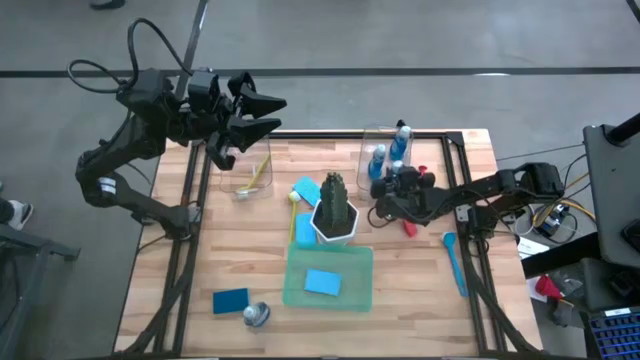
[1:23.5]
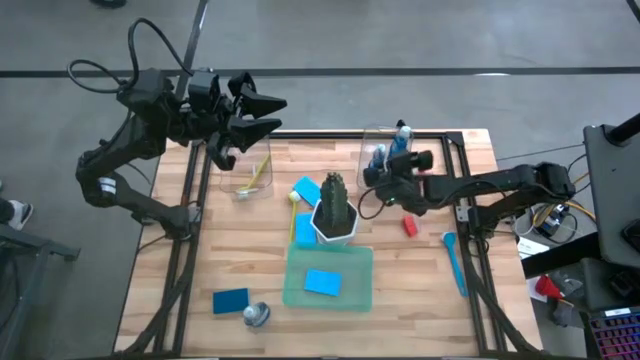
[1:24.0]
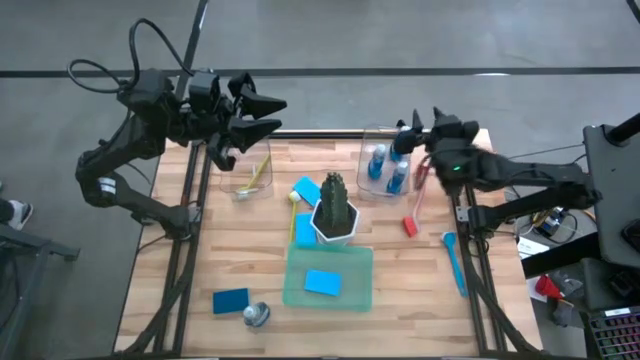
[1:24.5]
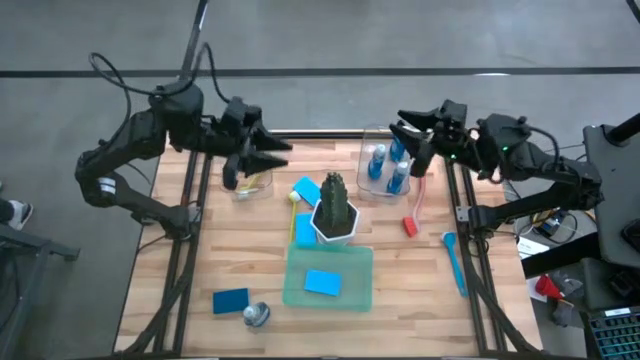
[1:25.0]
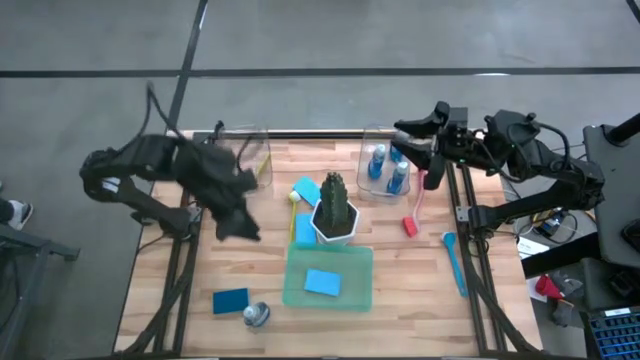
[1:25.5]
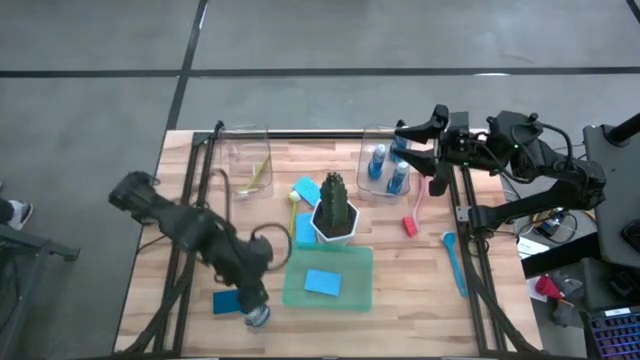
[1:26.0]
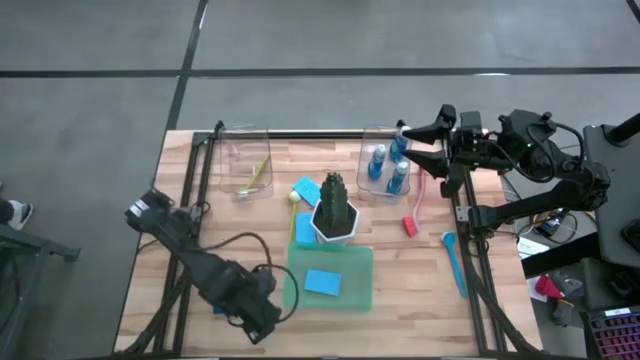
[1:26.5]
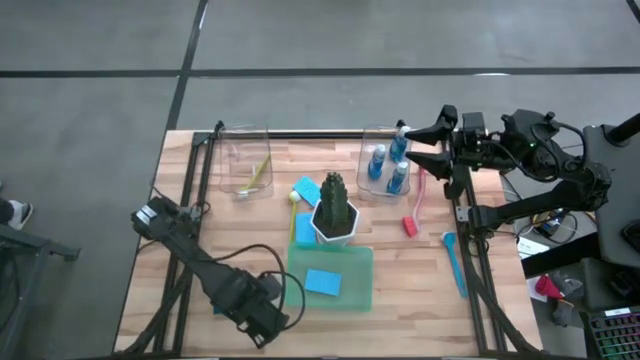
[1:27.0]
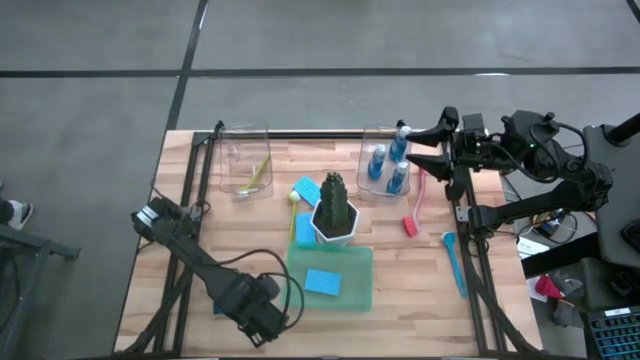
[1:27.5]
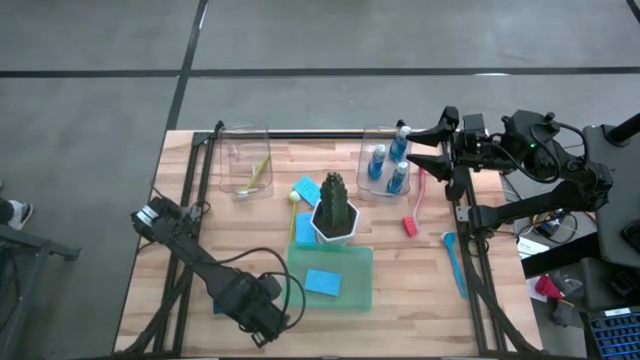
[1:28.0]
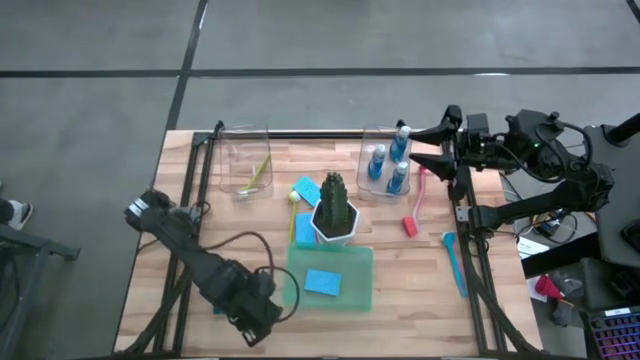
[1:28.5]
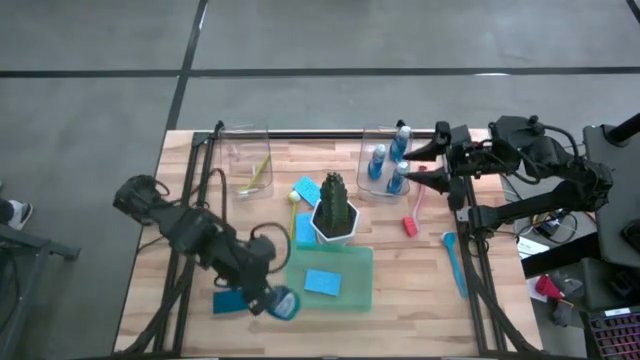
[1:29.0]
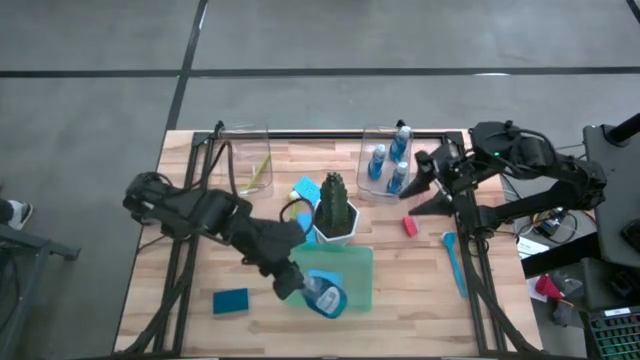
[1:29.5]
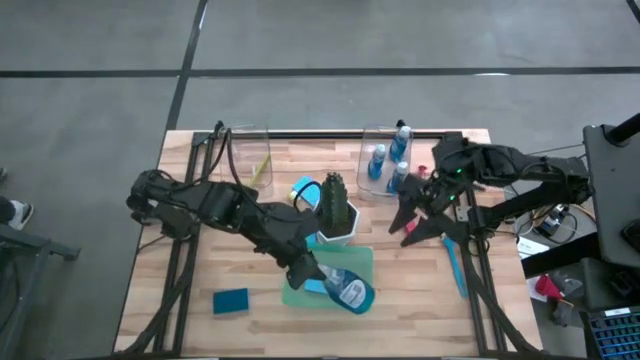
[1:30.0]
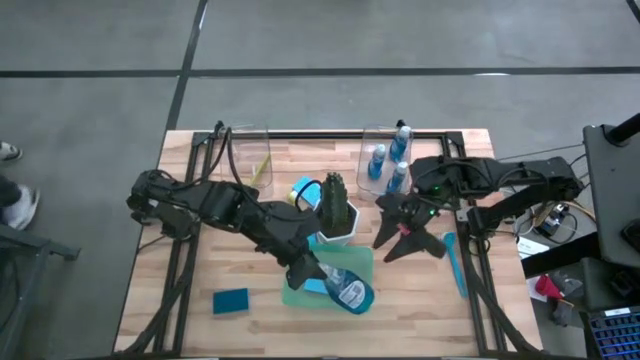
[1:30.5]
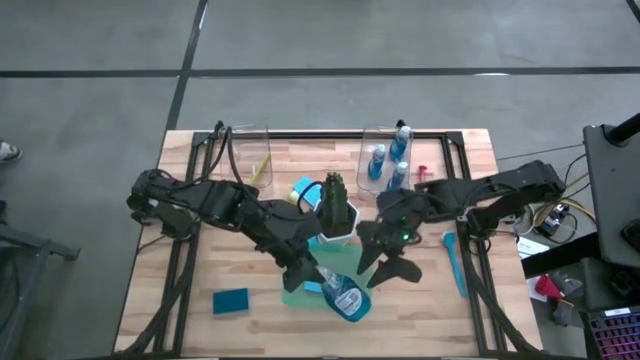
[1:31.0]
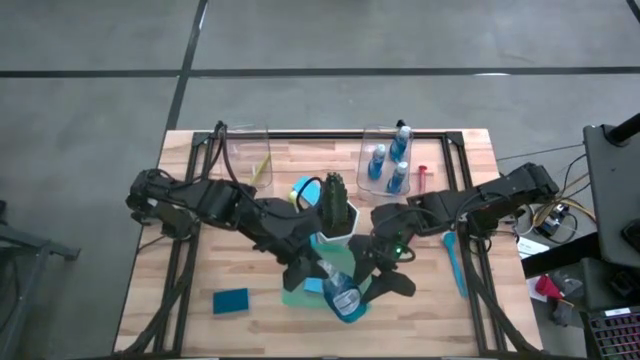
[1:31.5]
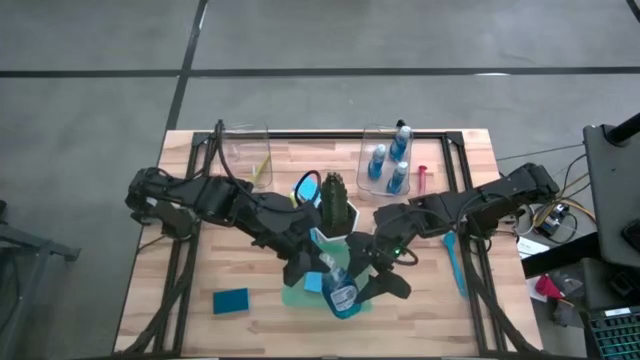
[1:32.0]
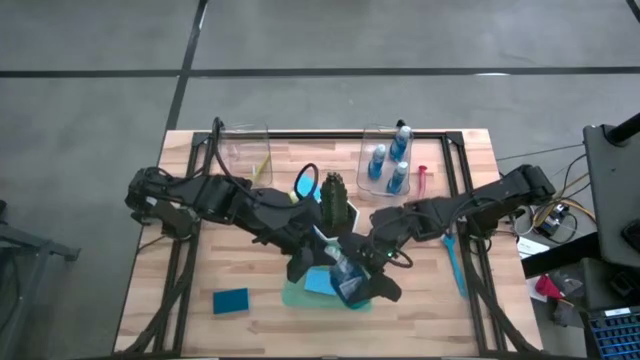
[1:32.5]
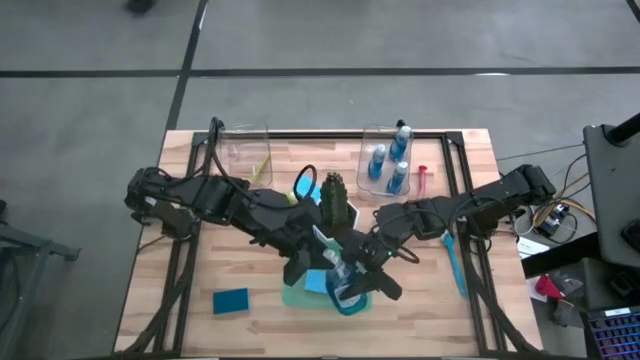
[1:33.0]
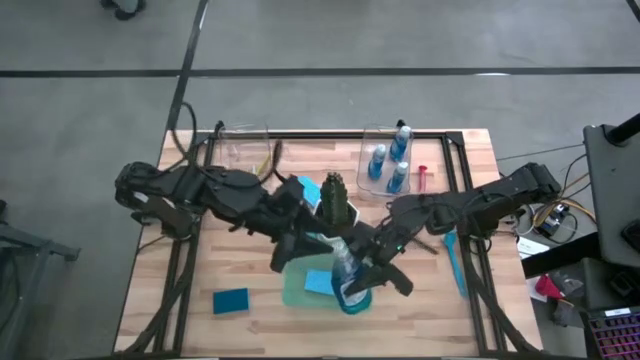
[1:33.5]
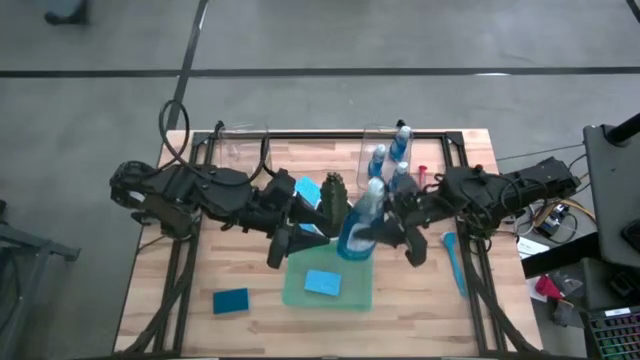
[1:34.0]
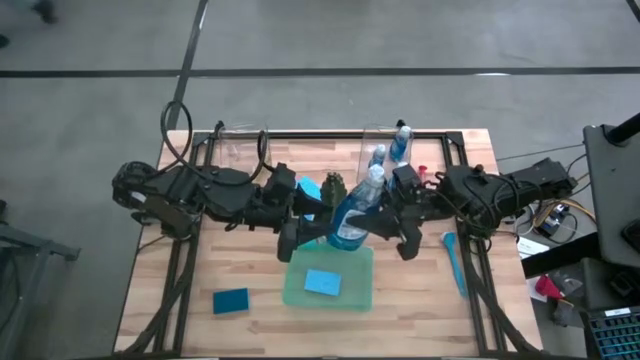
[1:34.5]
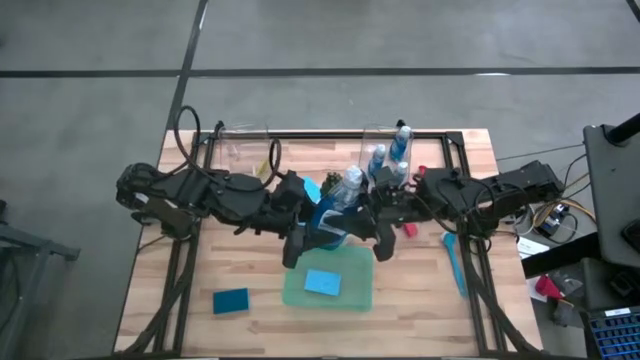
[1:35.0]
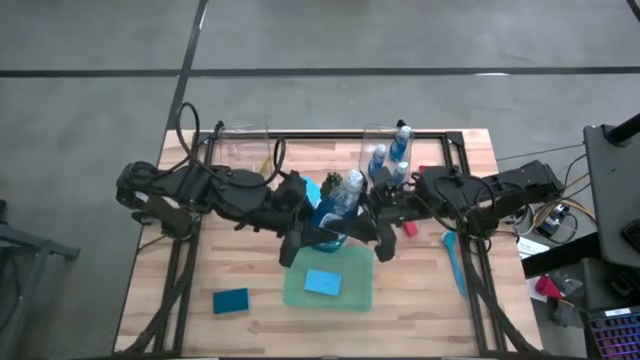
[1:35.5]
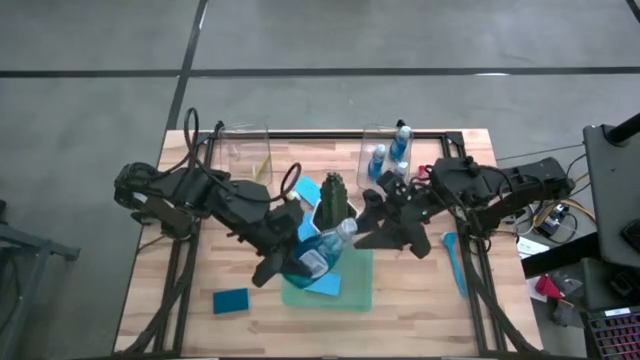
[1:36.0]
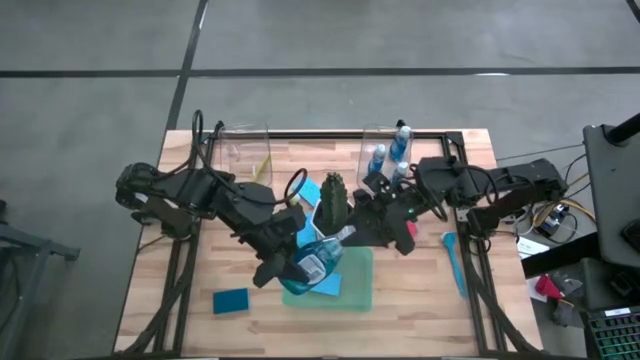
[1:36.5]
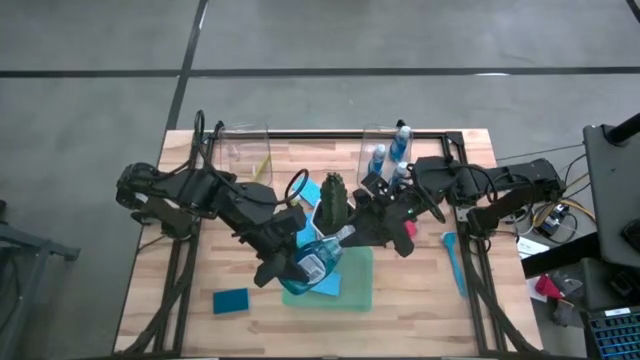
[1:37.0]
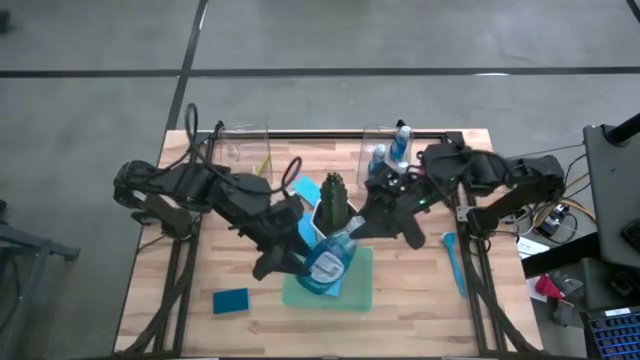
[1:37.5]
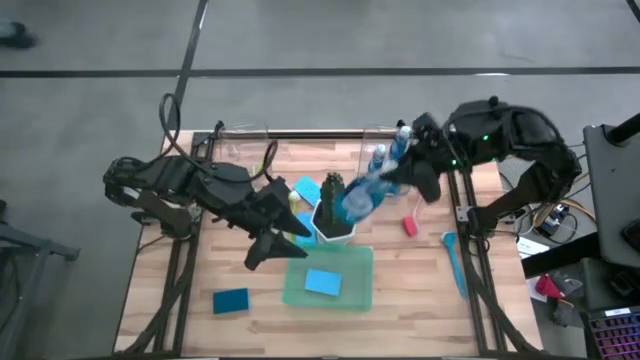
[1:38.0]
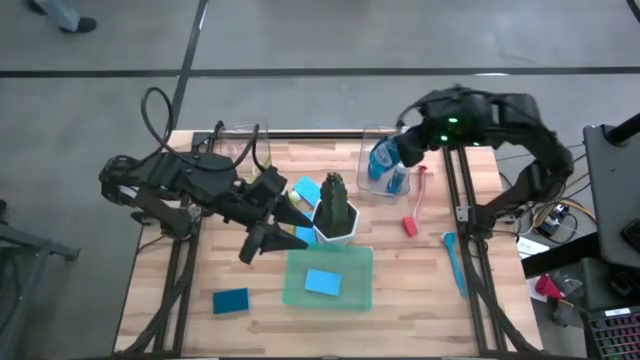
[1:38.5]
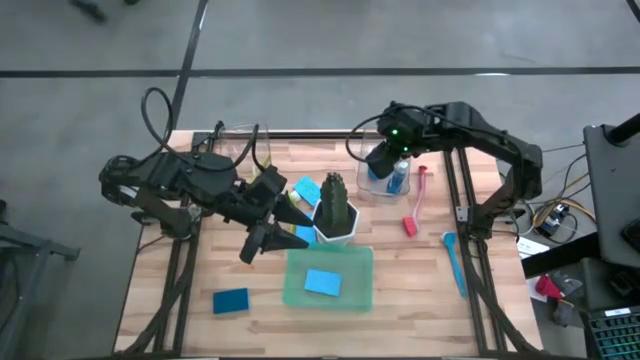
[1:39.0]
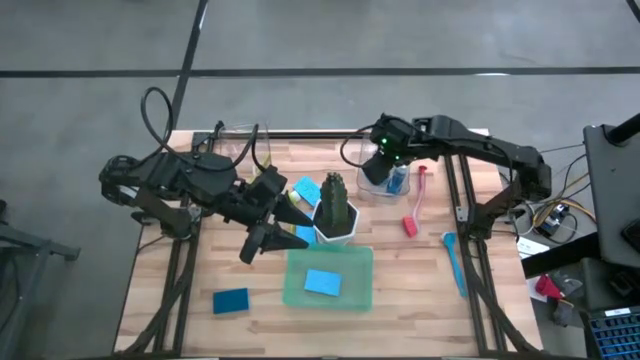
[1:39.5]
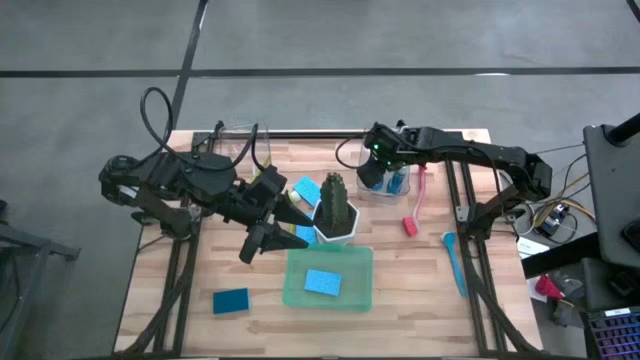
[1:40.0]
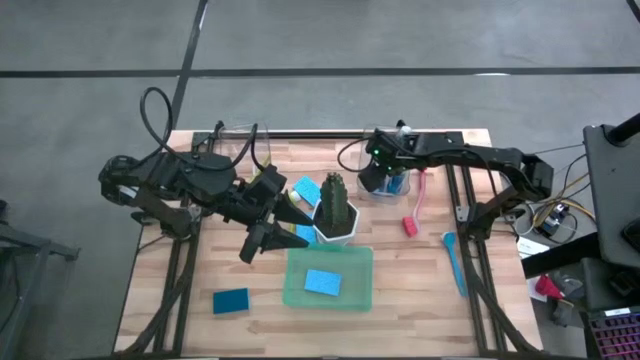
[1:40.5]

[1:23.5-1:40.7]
Task: Pick & Place Kitchen Sink Supplies
Put the dish soap into the right transparent bin

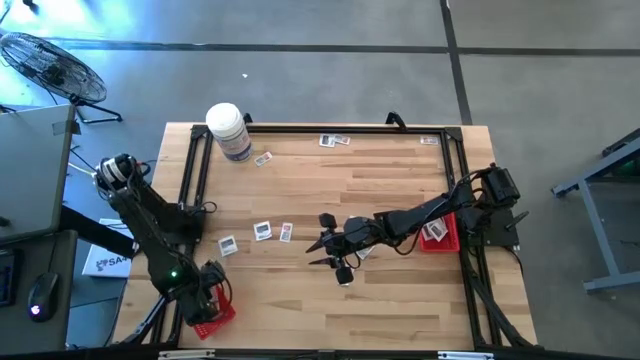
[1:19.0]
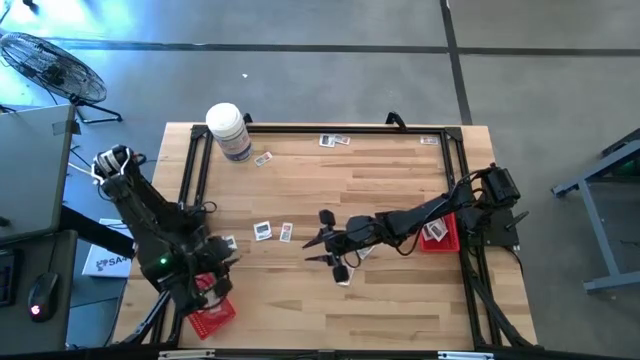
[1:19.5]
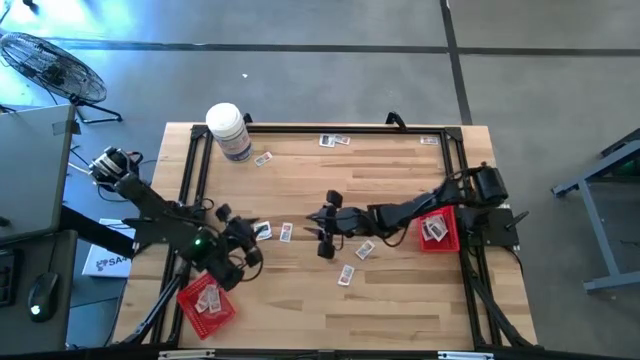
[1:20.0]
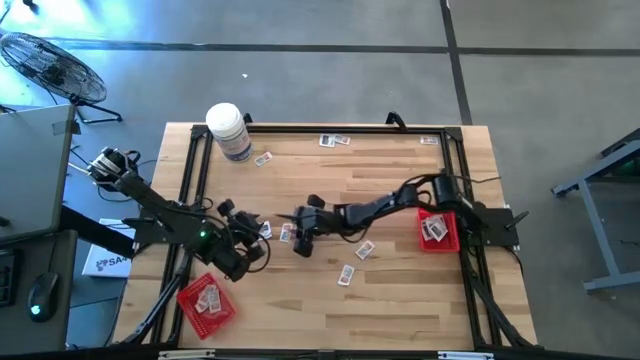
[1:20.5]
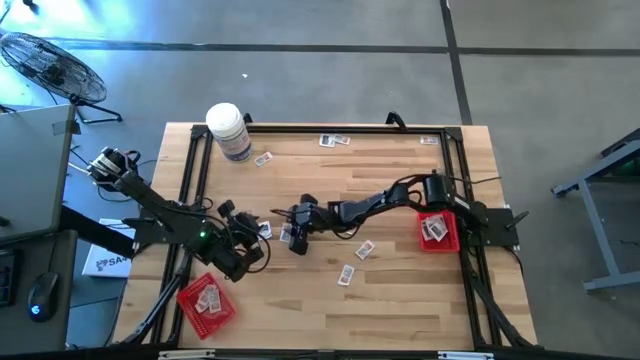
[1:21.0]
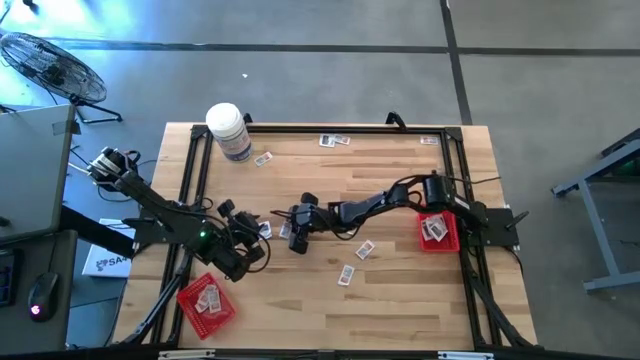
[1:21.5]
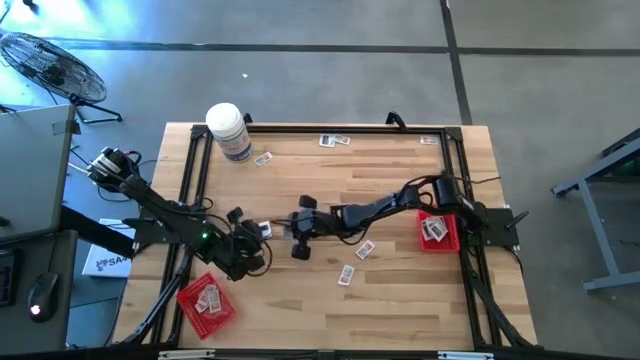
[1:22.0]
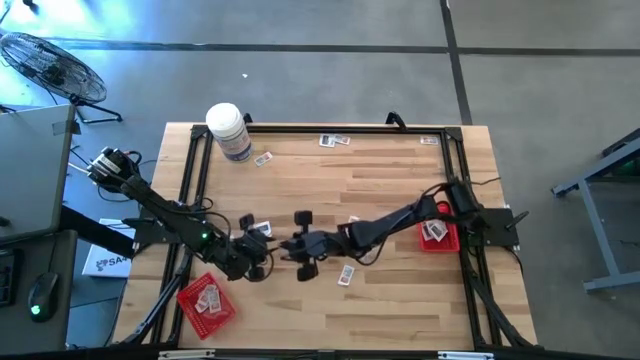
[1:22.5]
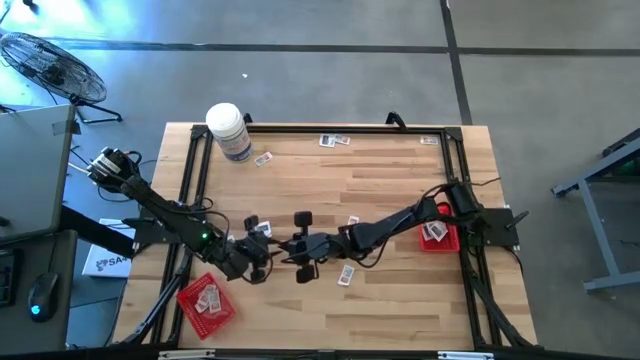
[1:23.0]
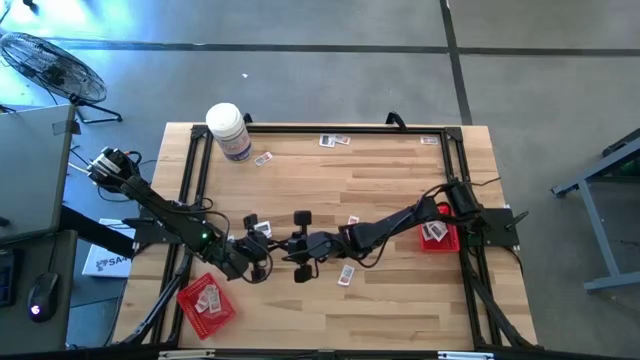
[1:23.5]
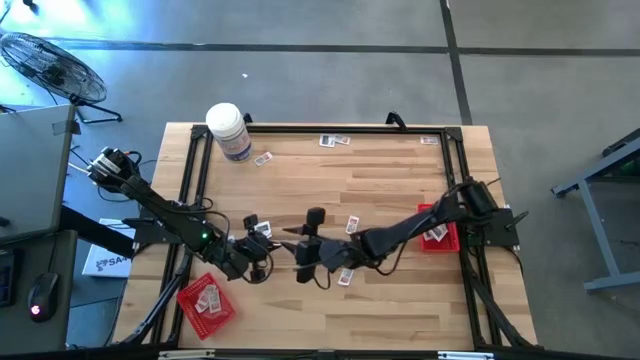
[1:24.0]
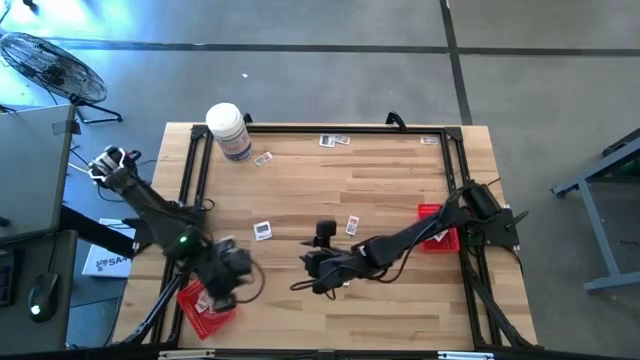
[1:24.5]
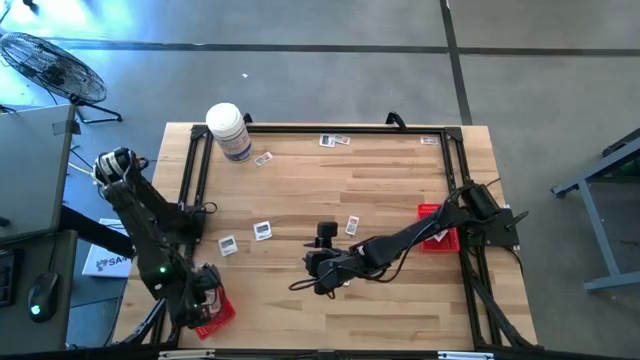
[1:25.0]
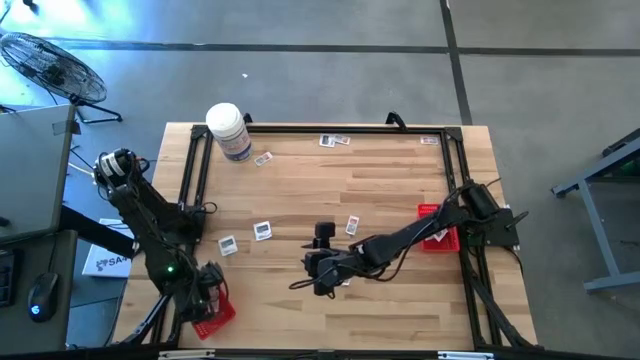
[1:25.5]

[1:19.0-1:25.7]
Task: Pick & Place First Aid Supplies
Put the ointment pack into the left red bin
